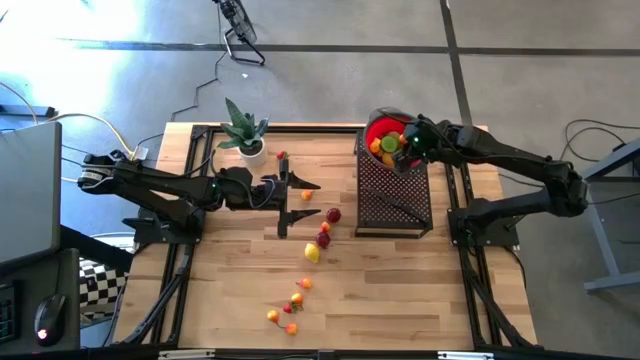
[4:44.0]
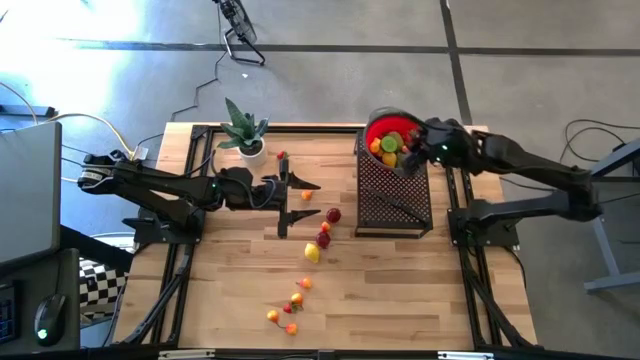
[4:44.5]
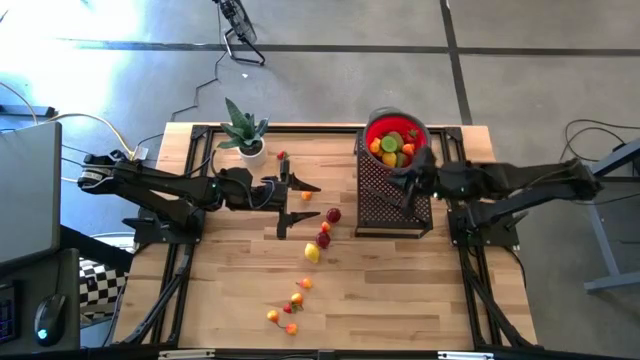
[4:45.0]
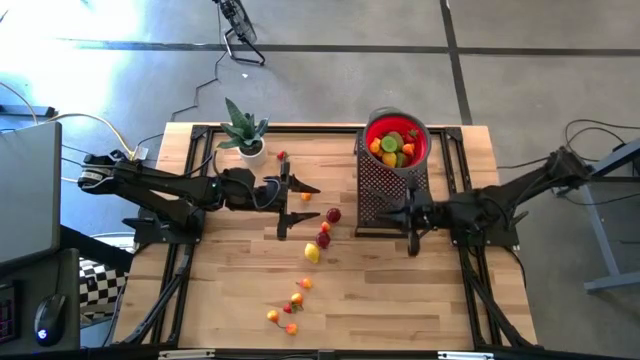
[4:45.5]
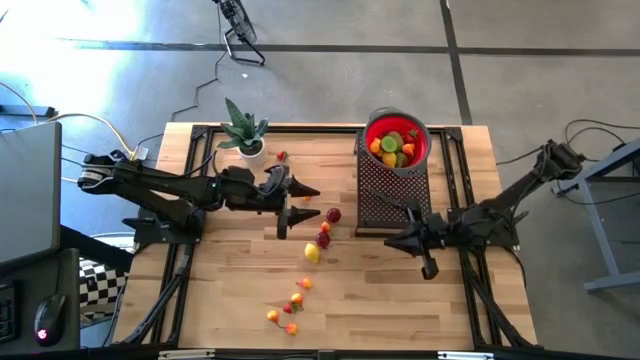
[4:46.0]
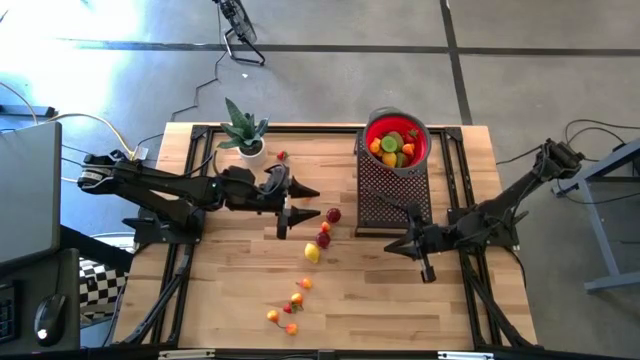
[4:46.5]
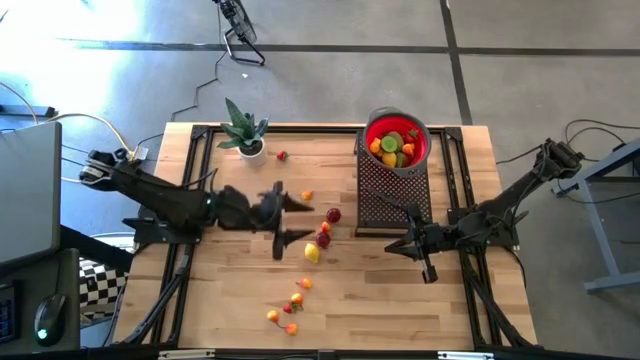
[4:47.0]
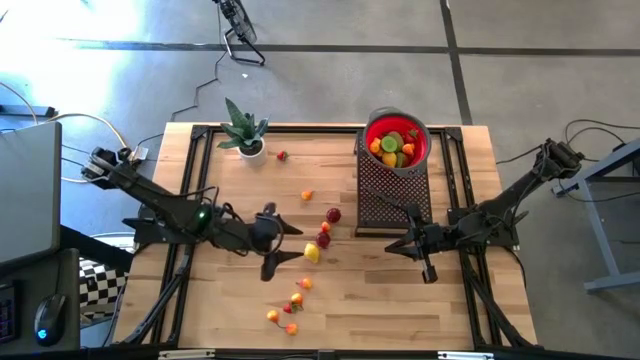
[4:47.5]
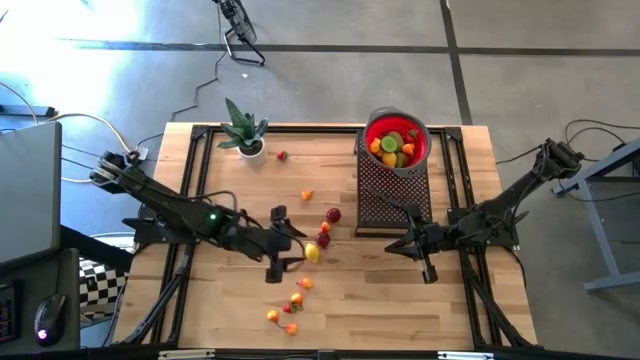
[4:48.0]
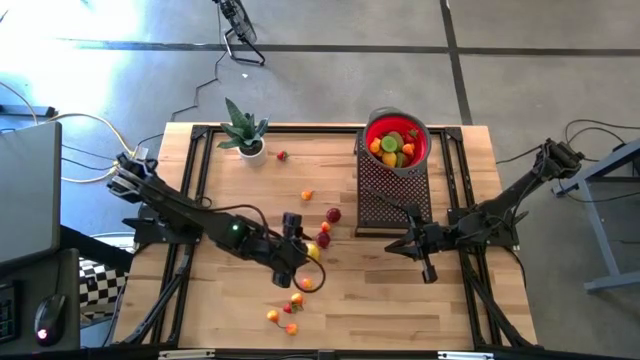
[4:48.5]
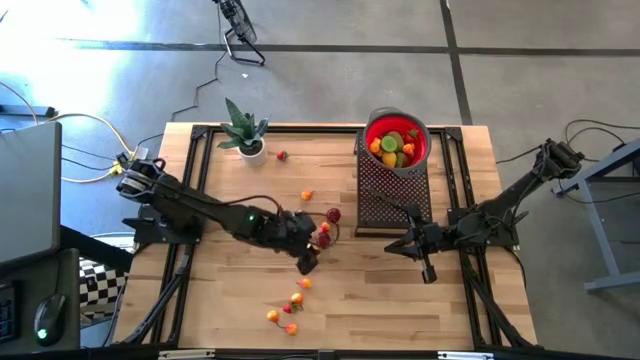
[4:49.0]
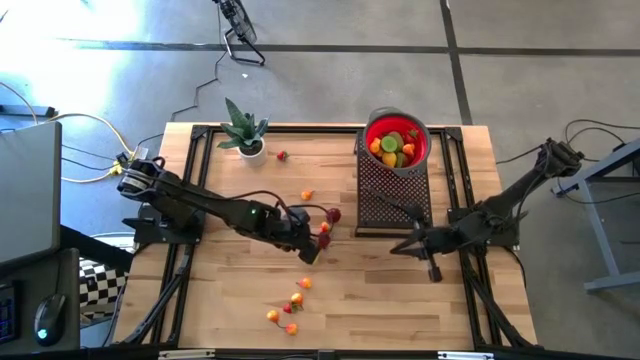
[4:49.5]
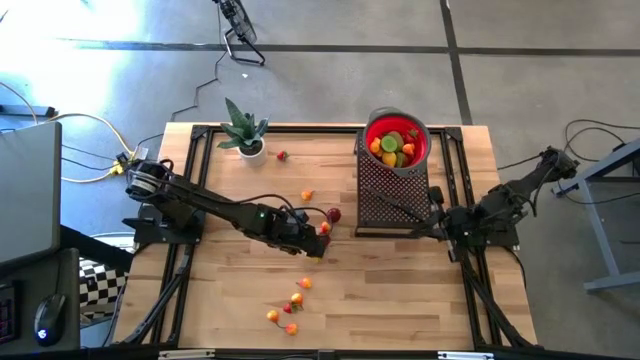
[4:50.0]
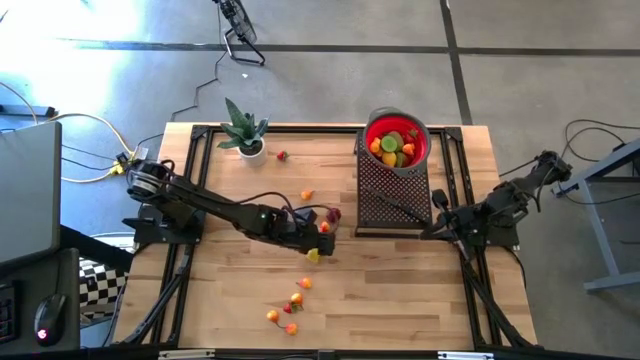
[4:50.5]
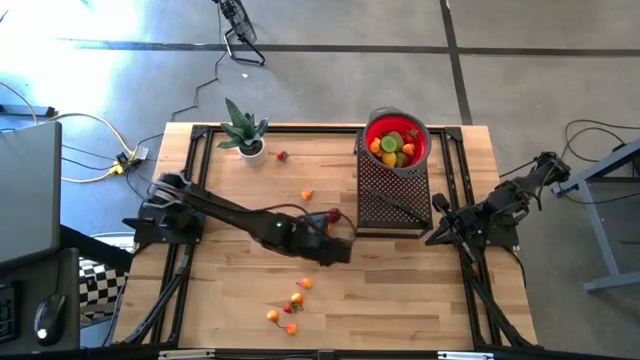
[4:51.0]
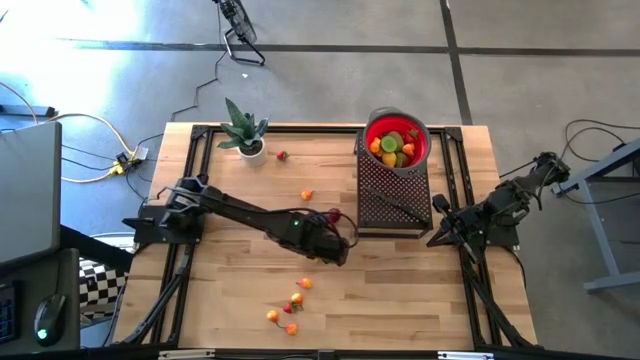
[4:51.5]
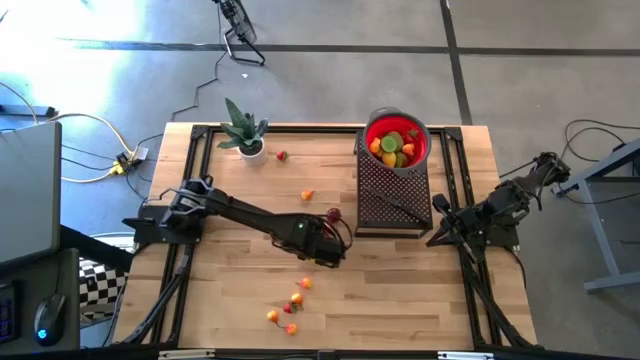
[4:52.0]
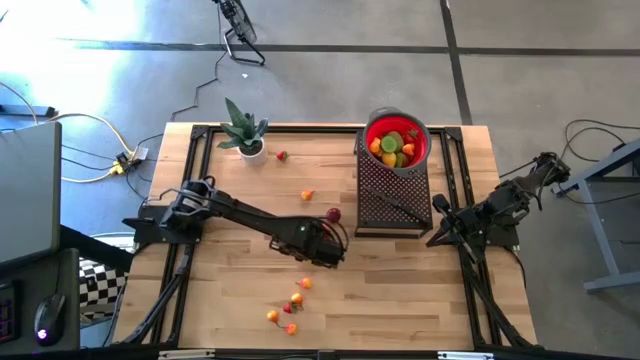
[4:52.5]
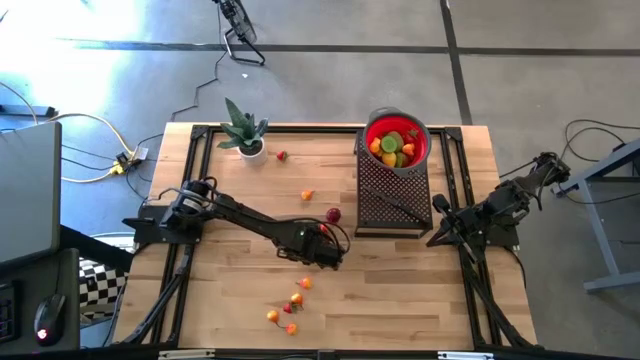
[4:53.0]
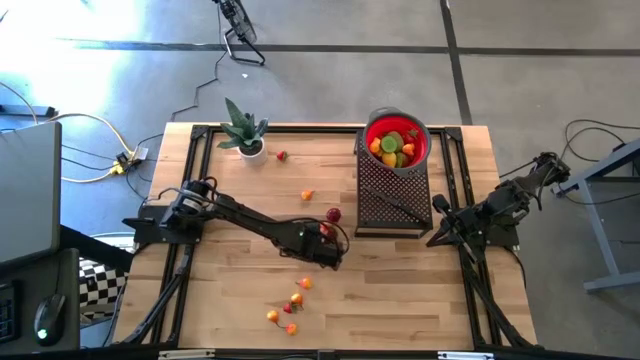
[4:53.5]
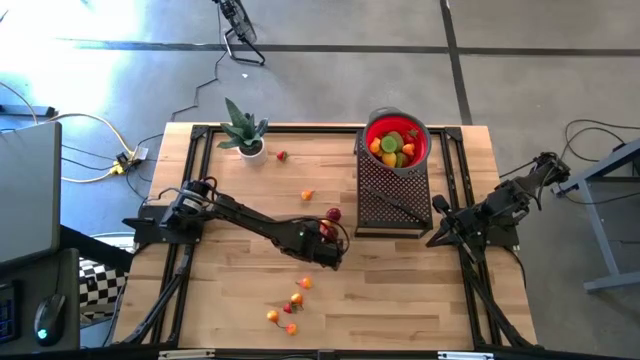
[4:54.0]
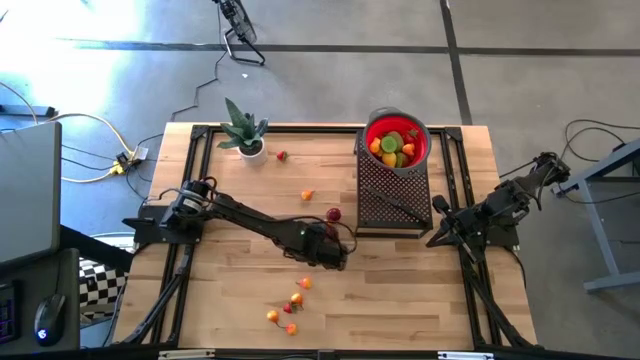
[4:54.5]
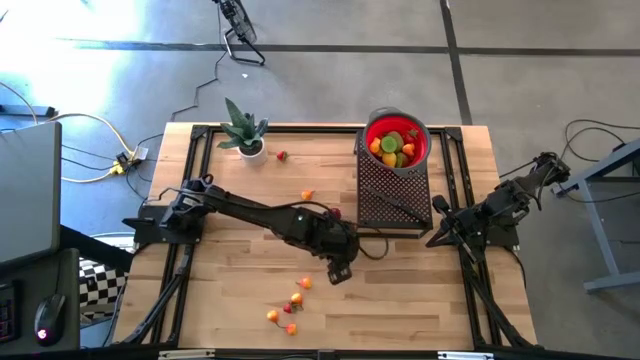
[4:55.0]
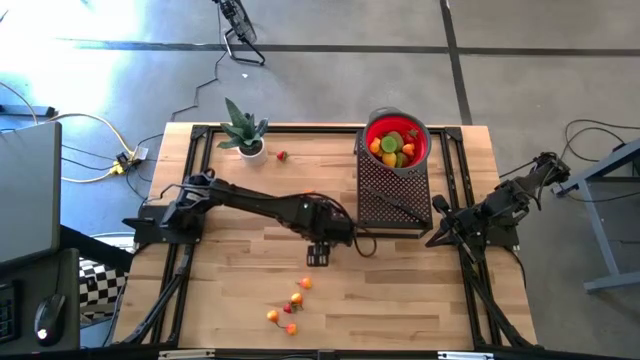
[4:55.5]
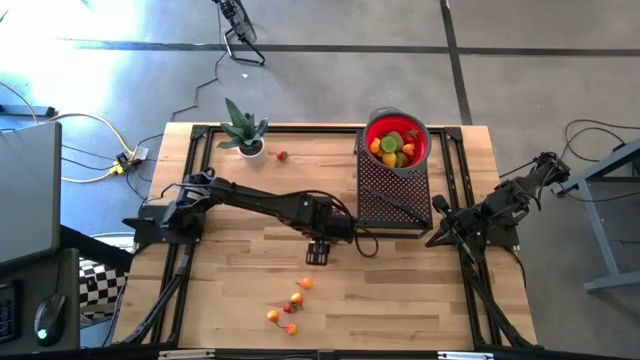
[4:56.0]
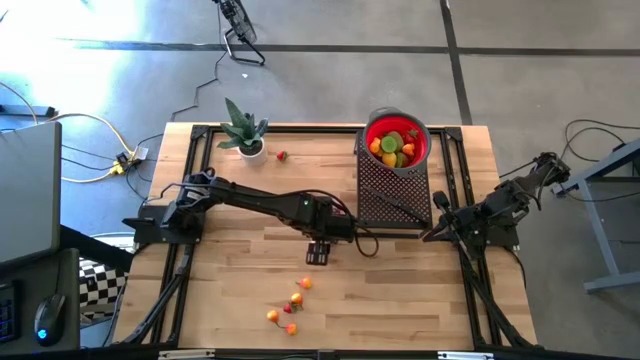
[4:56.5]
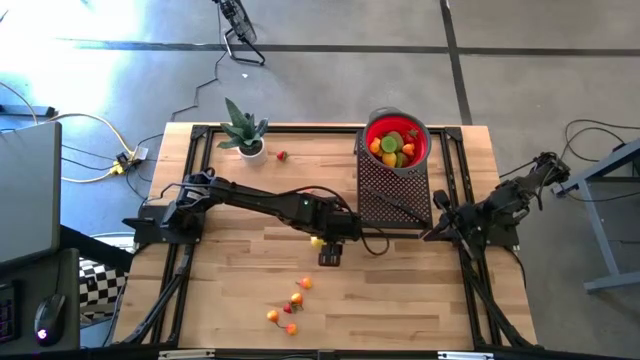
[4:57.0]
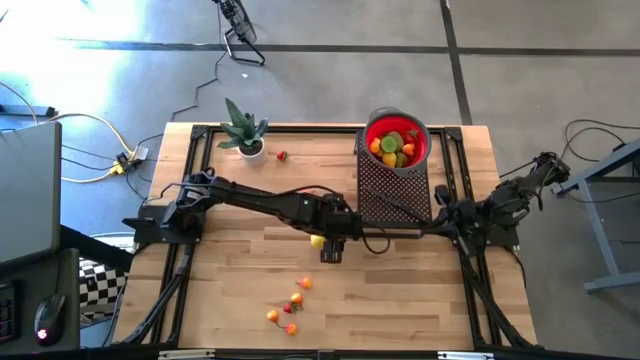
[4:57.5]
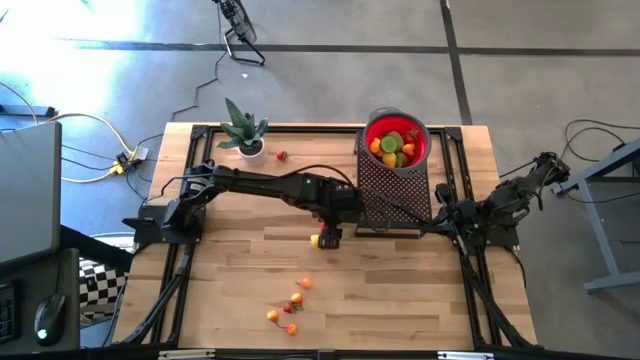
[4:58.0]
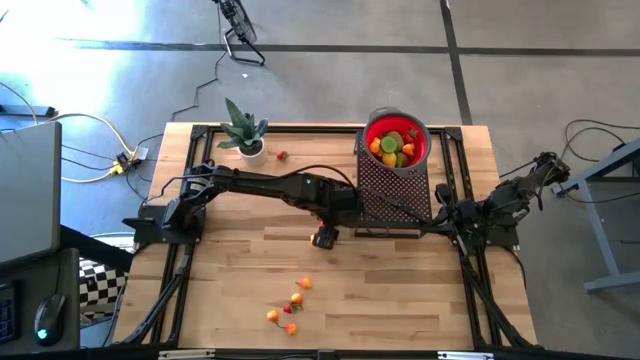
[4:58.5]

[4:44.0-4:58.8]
Task: Pick & Place Fruit
Put the lemon into the strainer bowl on the shelf

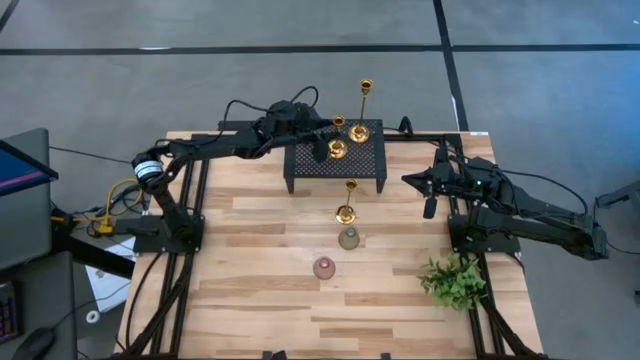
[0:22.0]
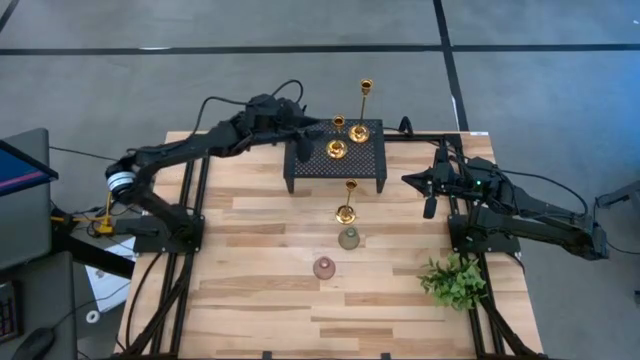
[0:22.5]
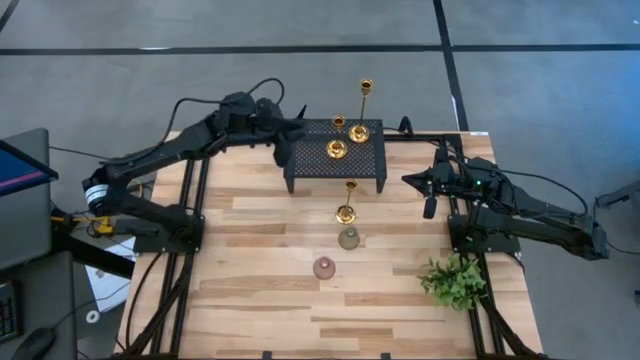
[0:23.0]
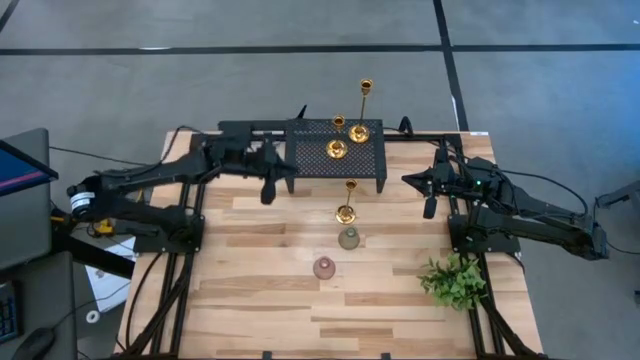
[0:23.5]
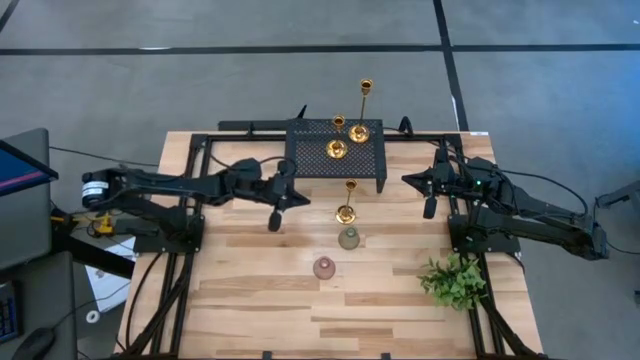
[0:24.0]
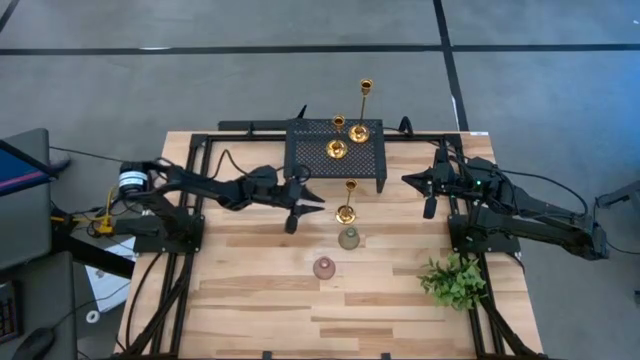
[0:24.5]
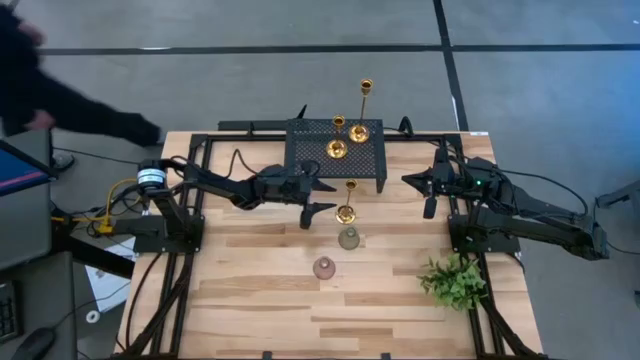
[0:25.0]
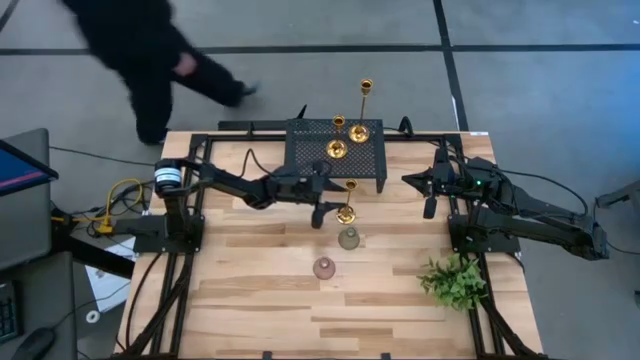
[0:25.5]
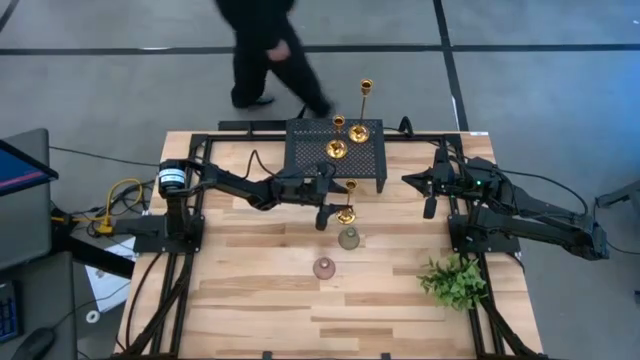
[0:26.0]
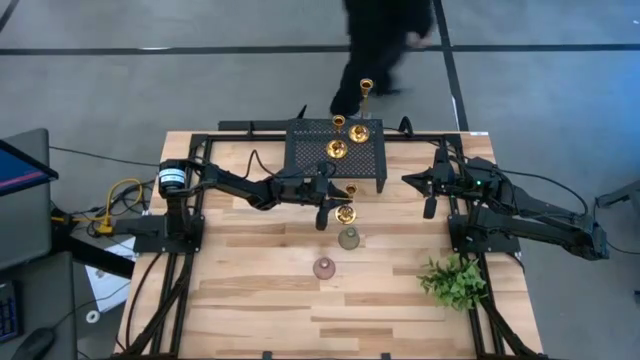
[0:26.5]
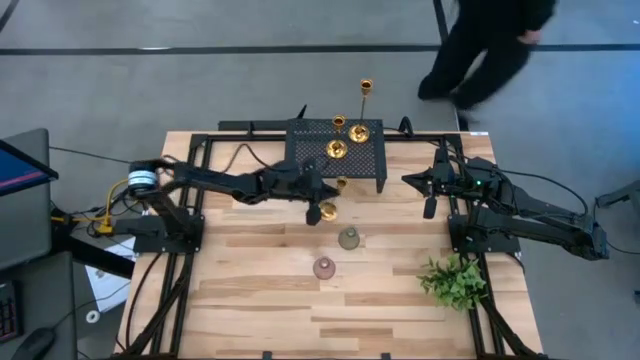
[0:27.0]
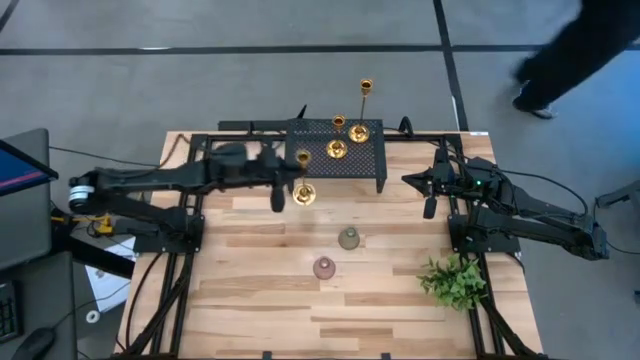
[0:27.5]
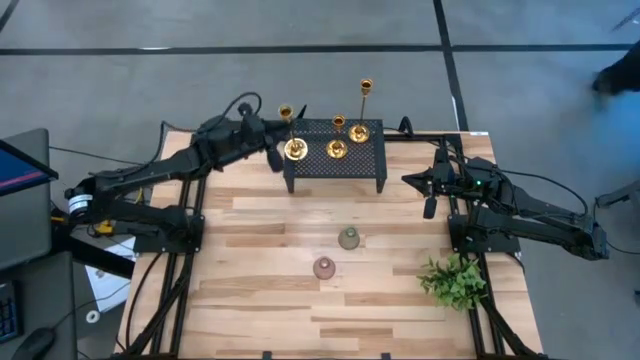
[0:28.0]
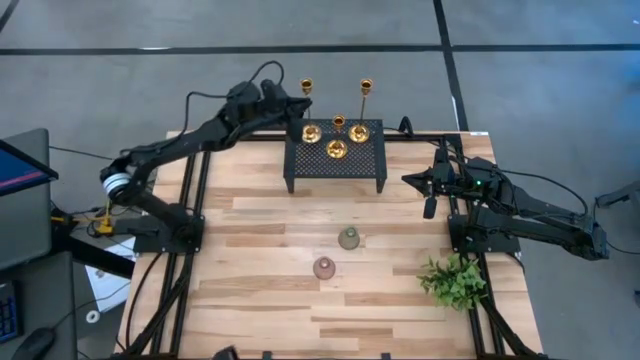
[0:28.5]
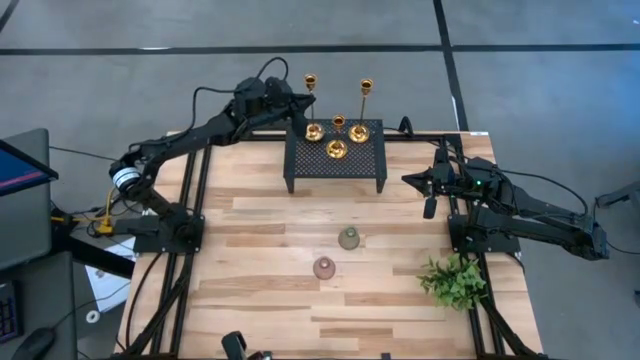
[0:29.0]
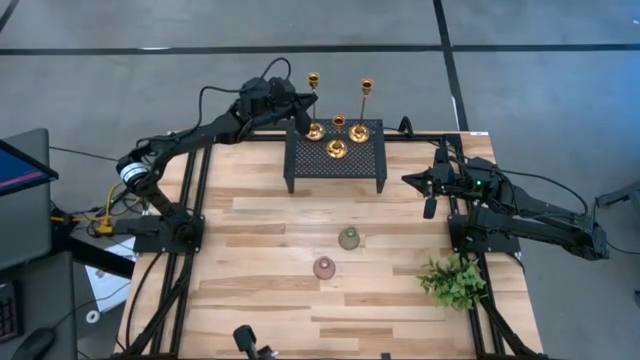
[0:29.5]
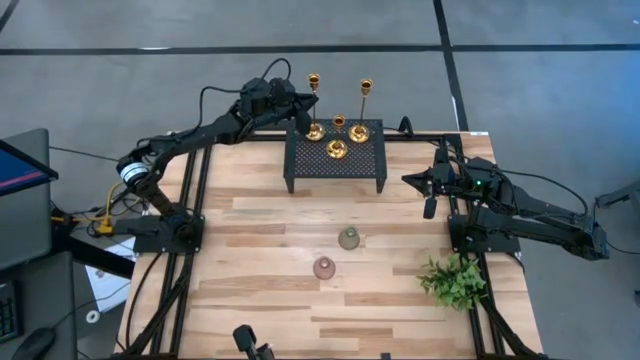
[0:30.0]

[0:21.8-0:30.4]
Task: Pick & Place candle stick holders
Put the gold candle holder on the shelf
